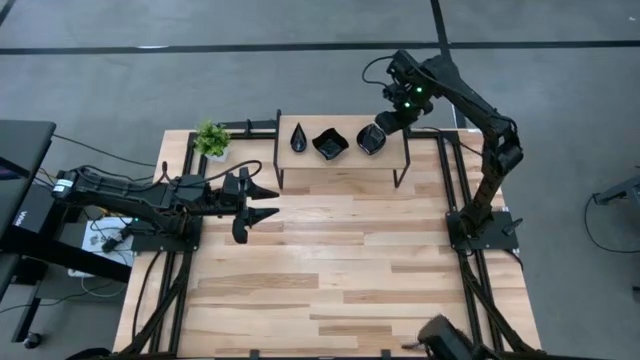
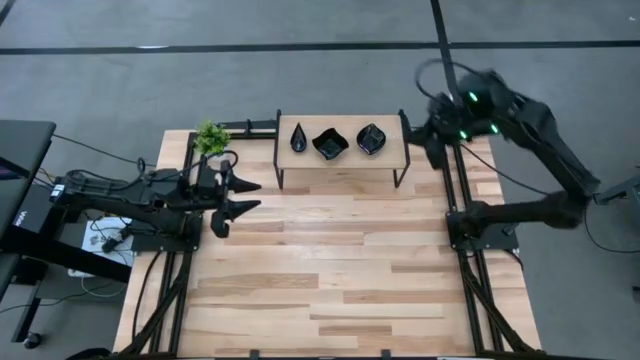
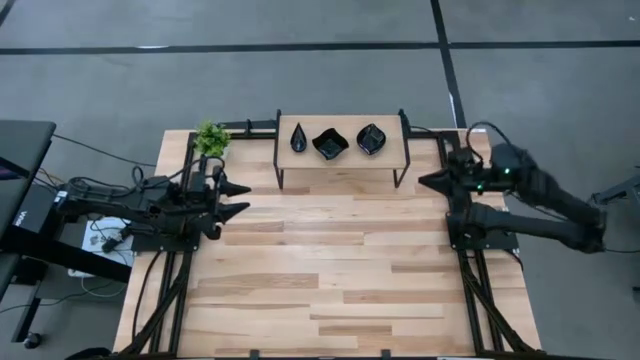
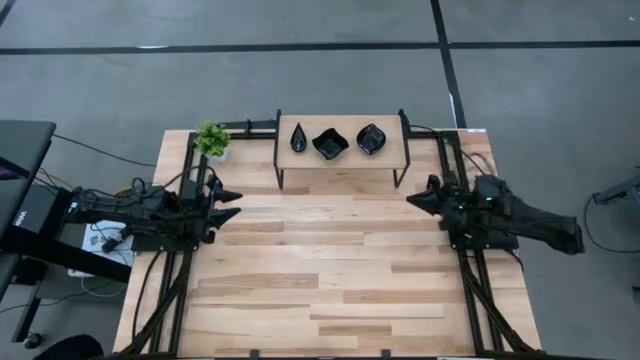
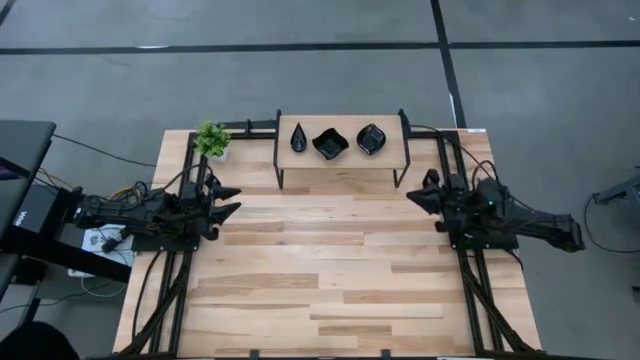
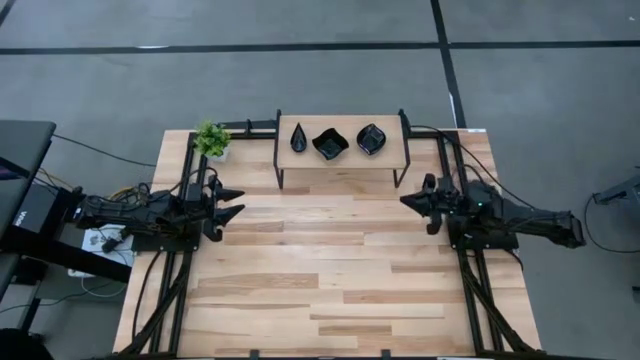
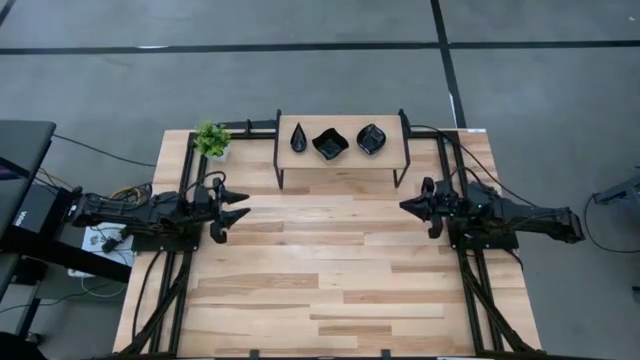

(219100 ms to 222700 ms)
Task: Pick & Place Mini shaped plates
Return to Home Position

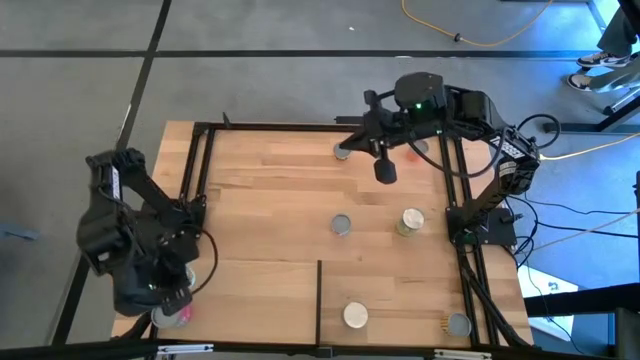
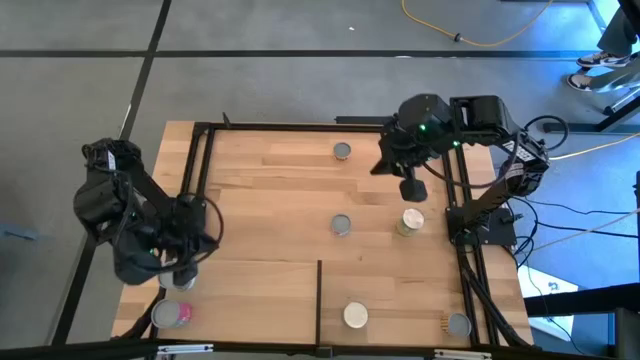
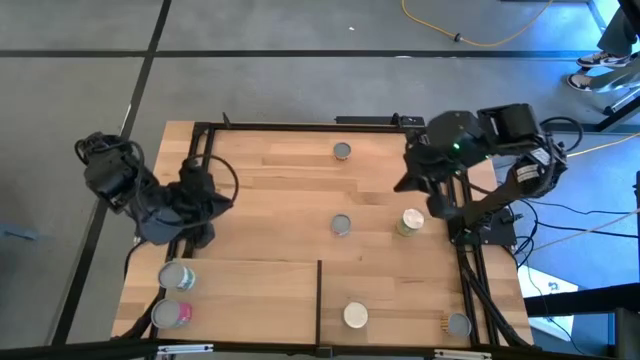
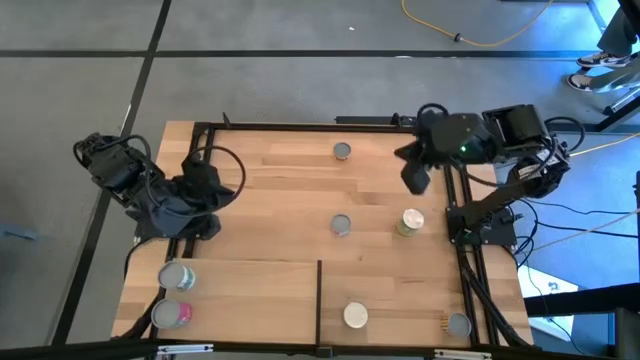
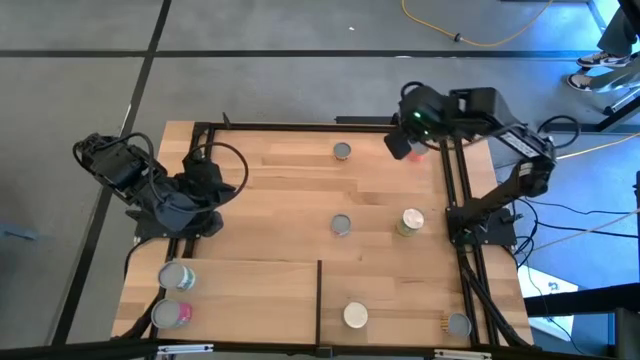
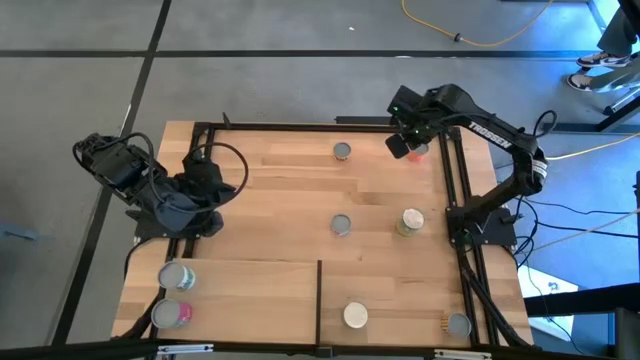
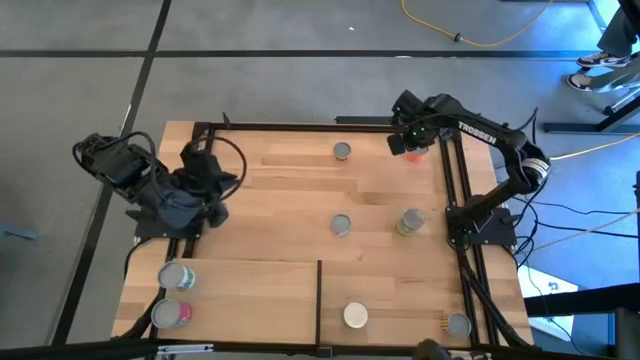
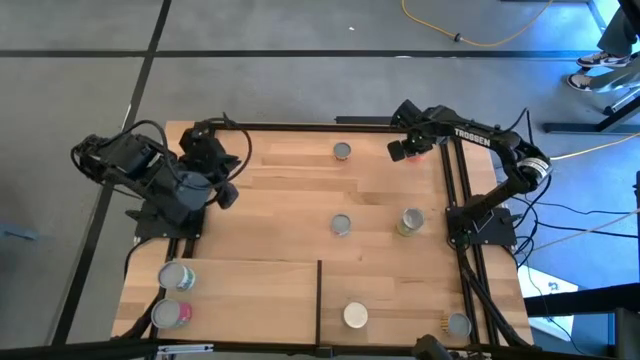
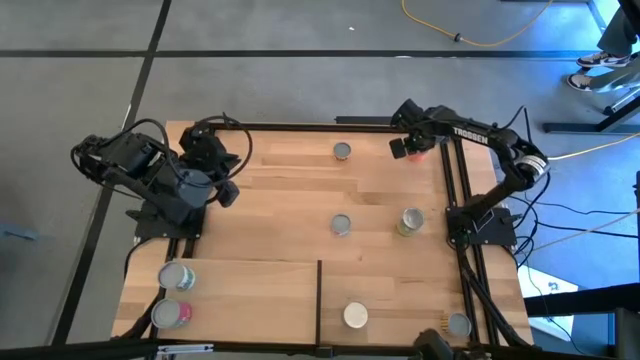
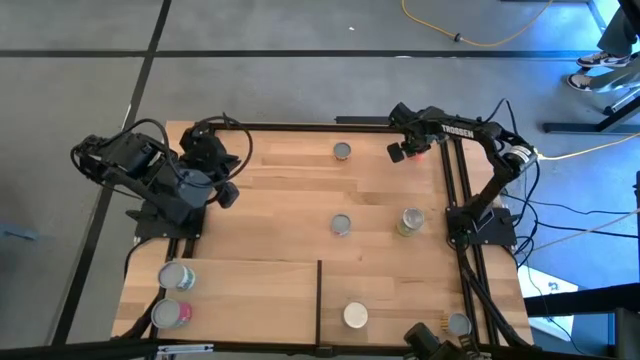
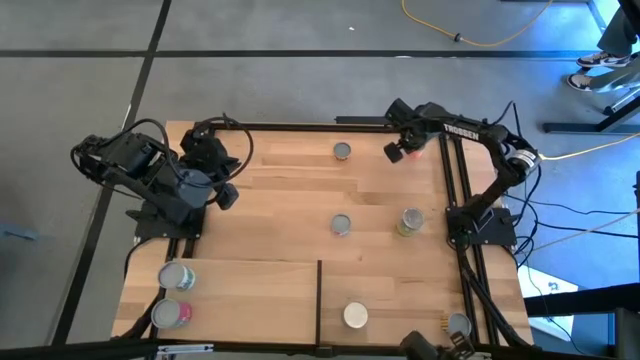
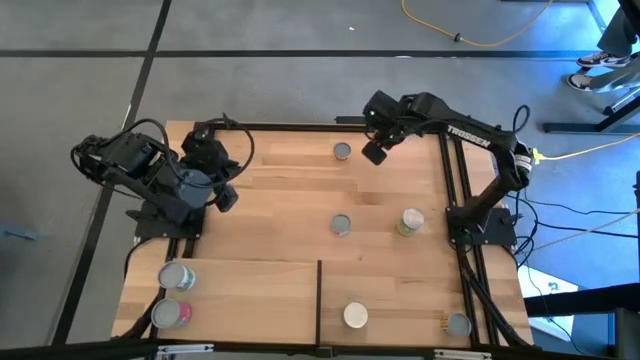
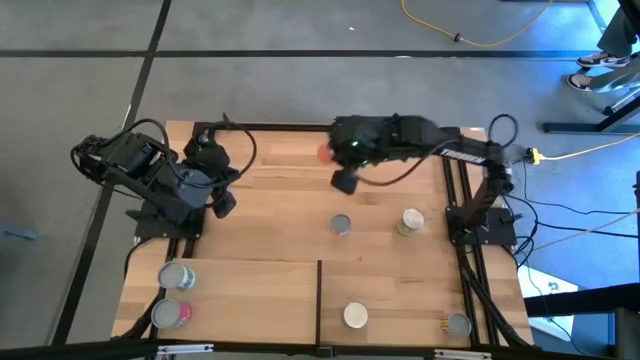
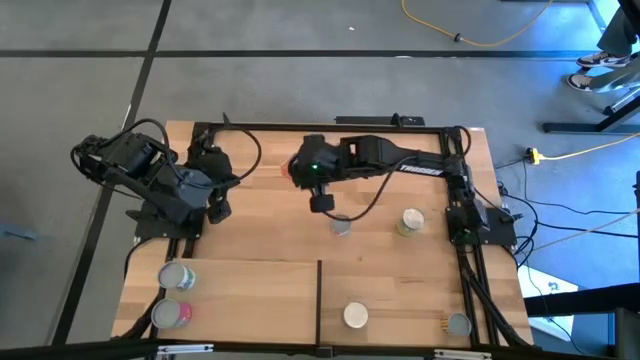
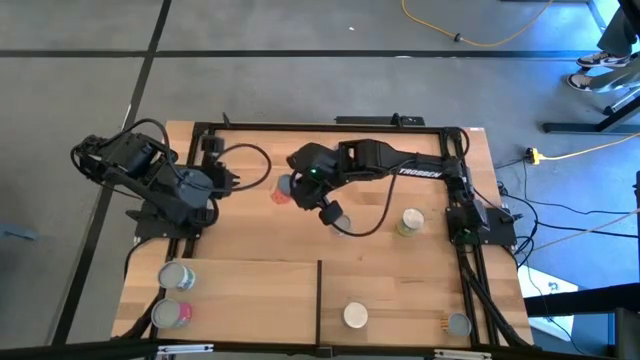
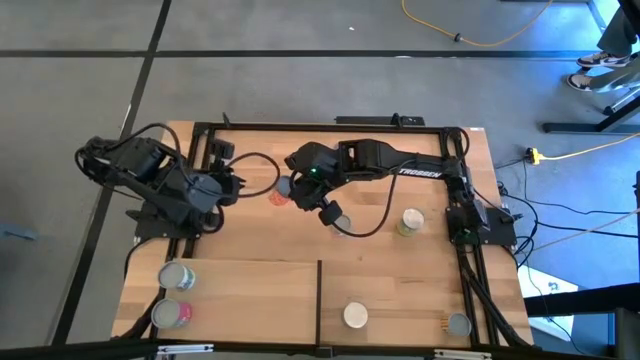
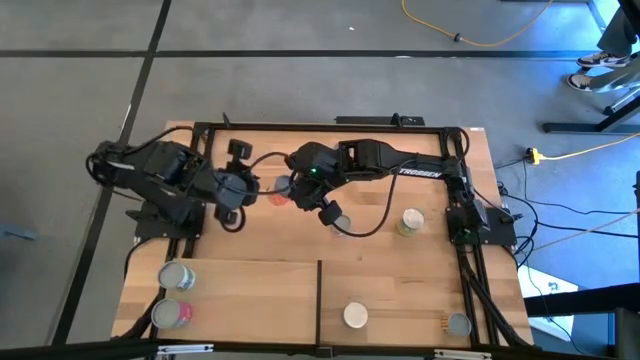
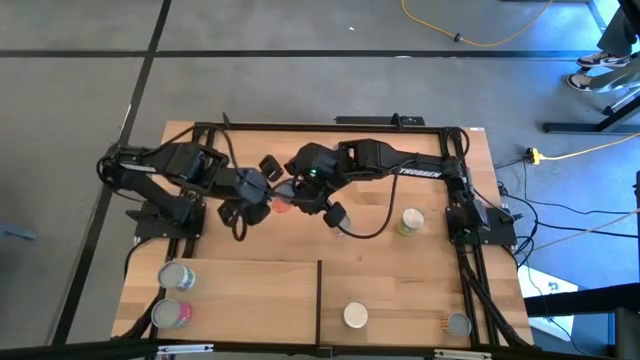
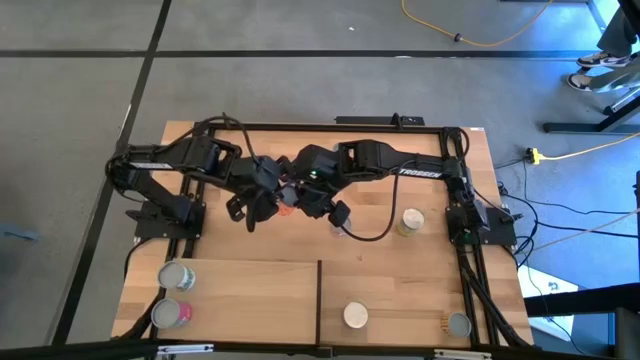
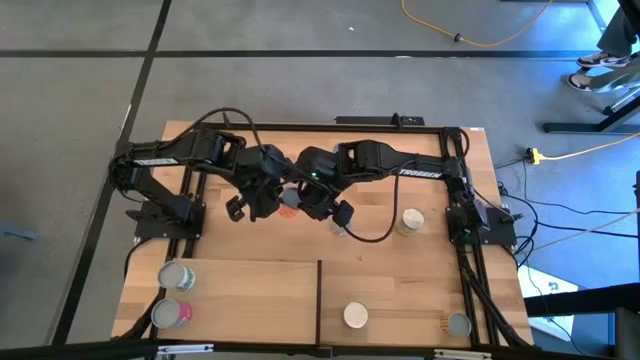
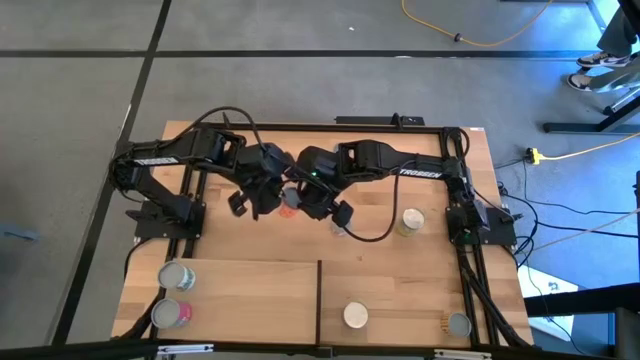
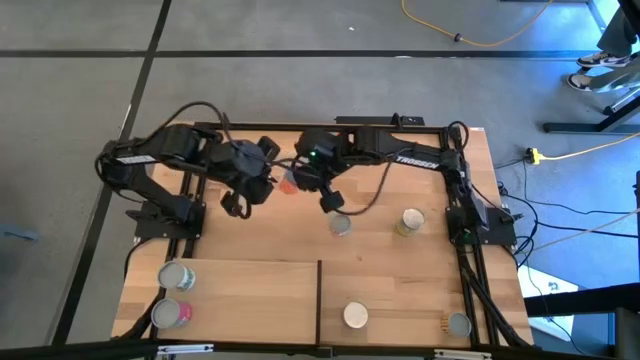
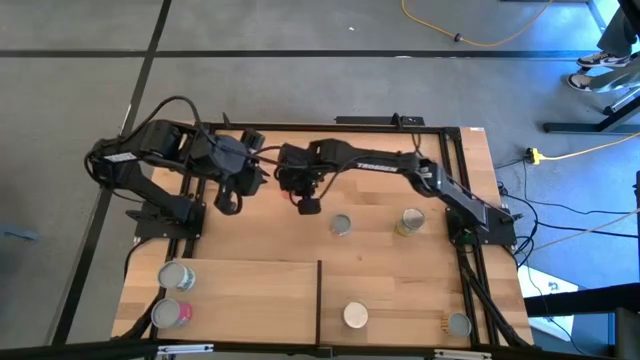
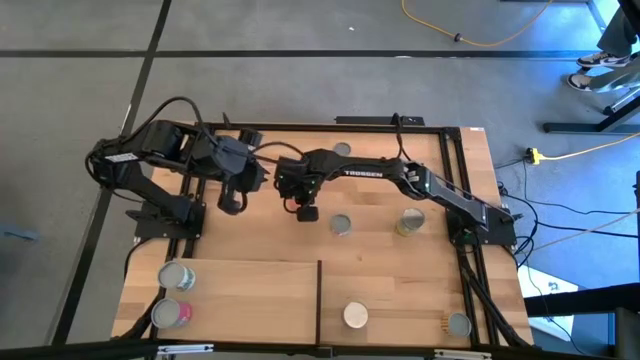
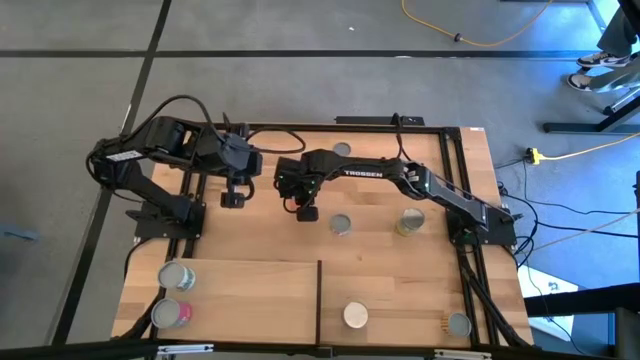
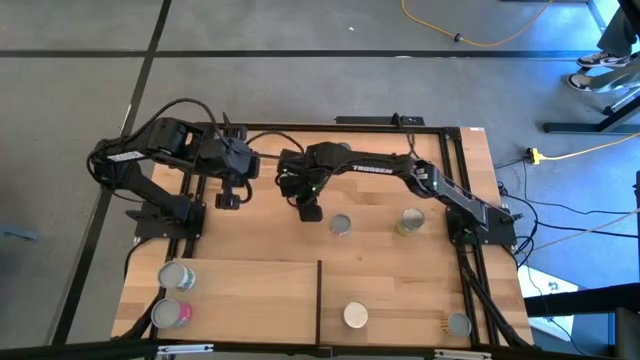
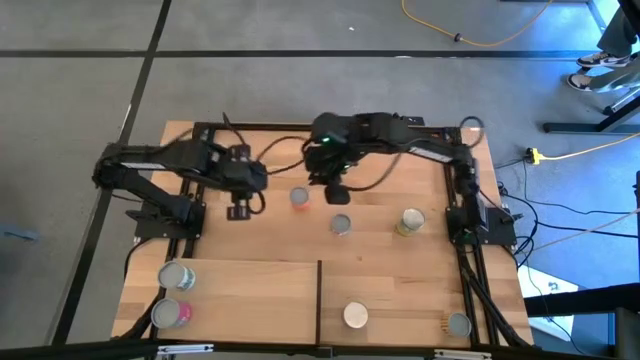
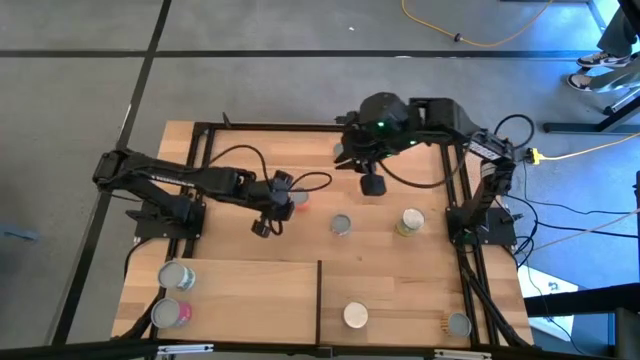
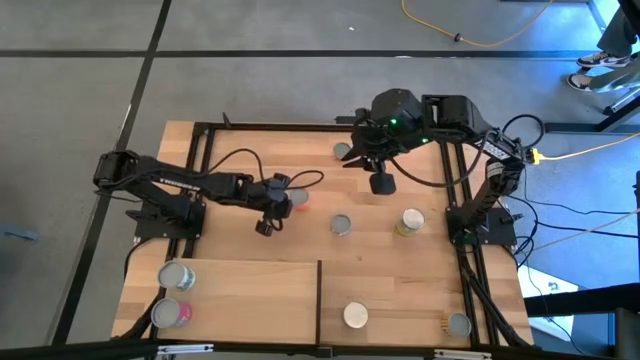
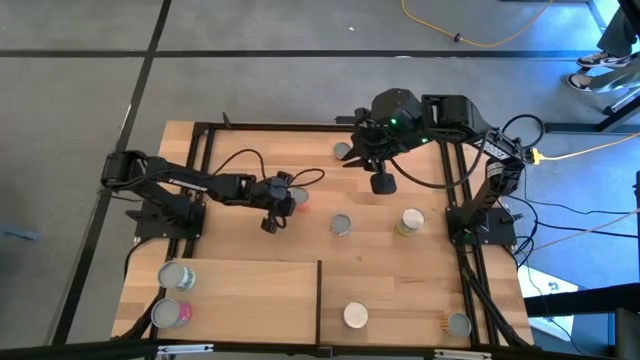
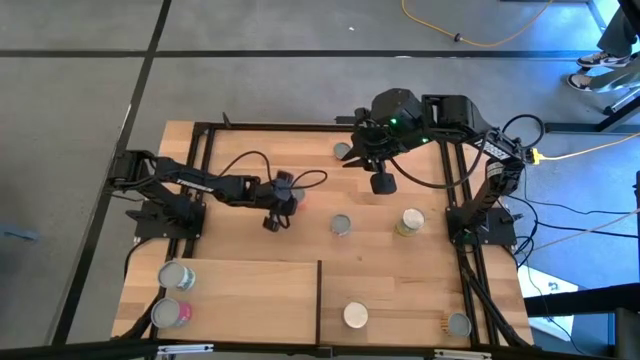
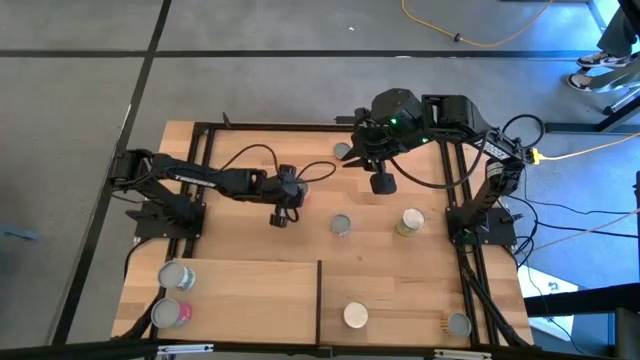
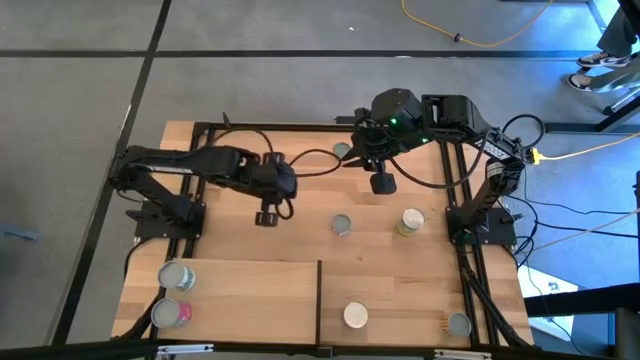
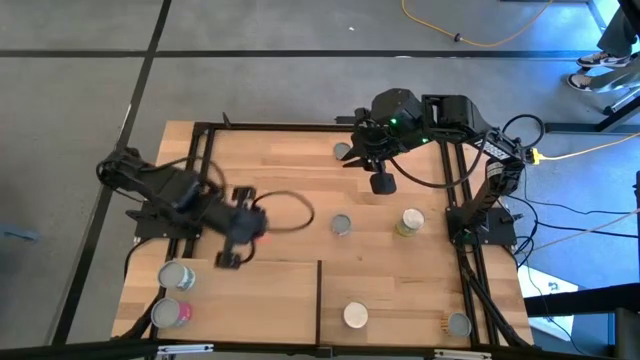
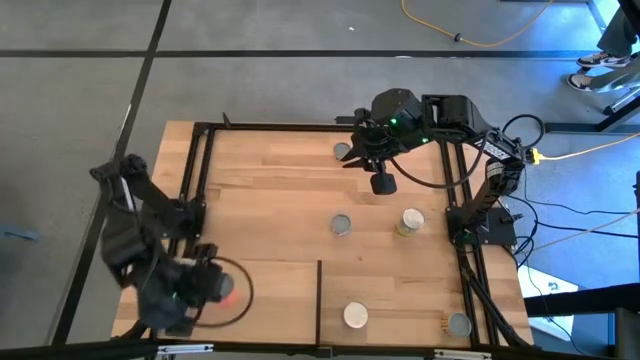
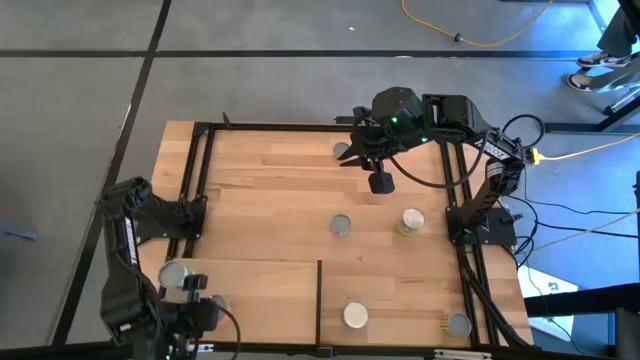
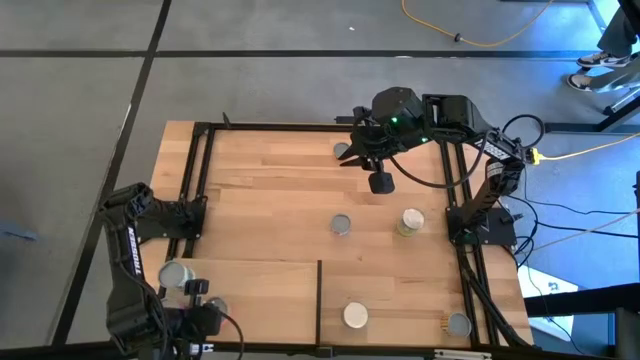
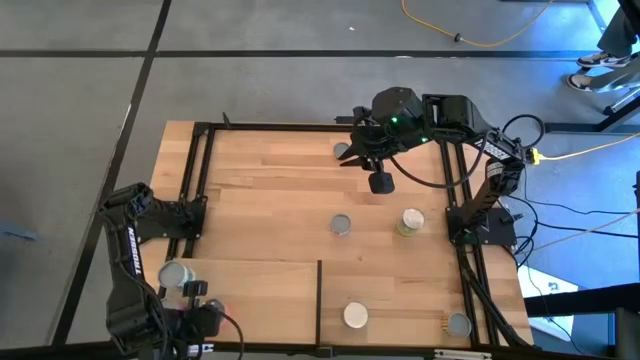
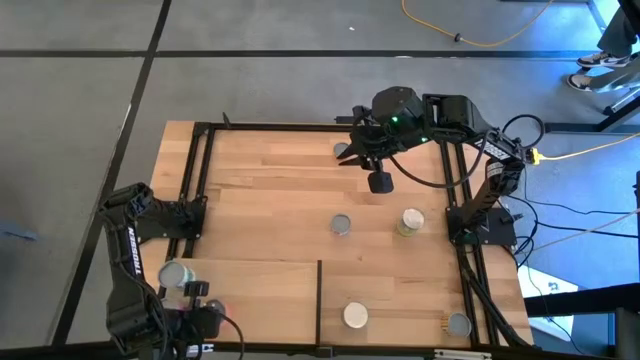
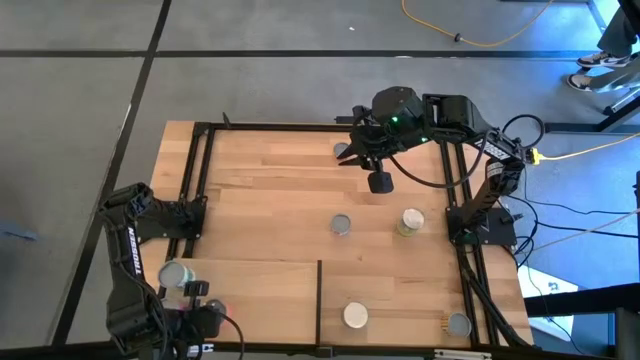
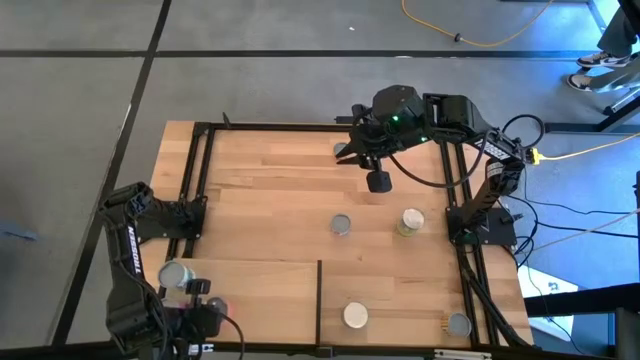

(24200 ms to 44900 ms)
Task: Pick and place cans onto a shelf
Put the canned saucy meatballs on the shelf
